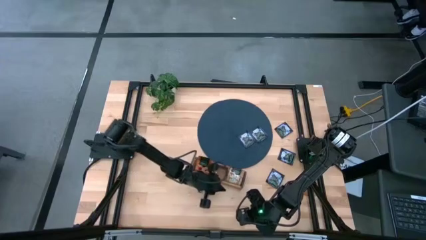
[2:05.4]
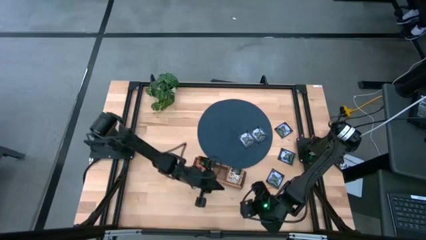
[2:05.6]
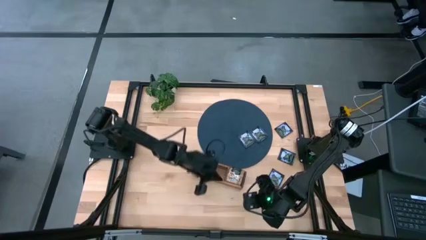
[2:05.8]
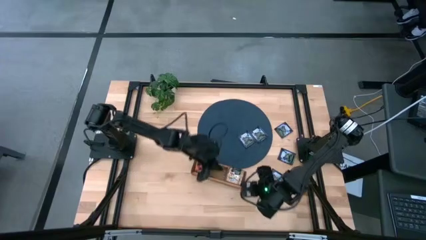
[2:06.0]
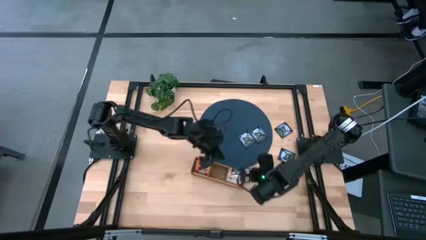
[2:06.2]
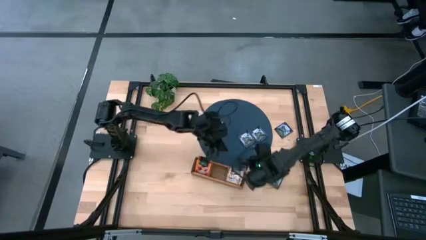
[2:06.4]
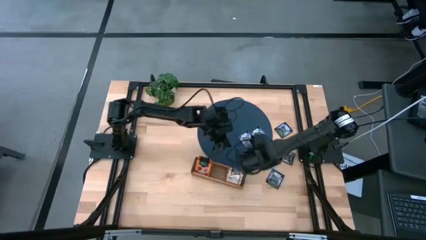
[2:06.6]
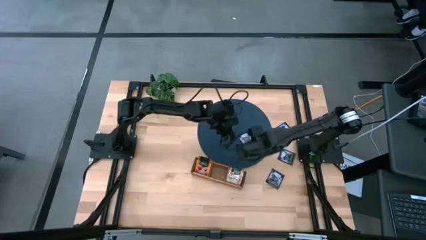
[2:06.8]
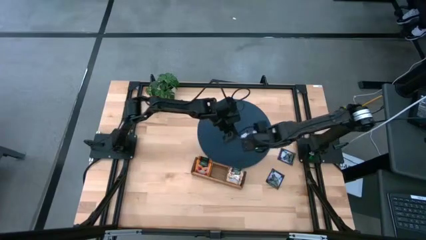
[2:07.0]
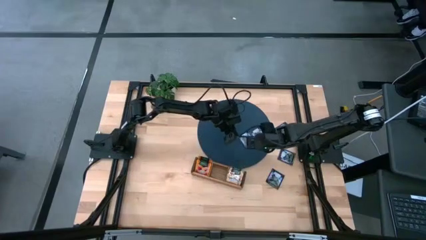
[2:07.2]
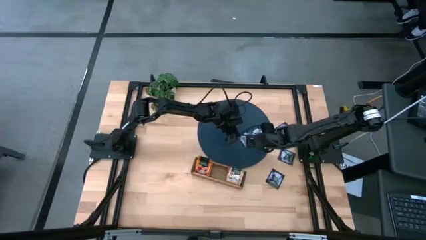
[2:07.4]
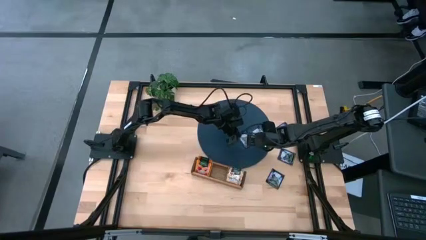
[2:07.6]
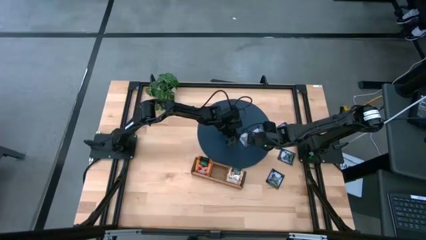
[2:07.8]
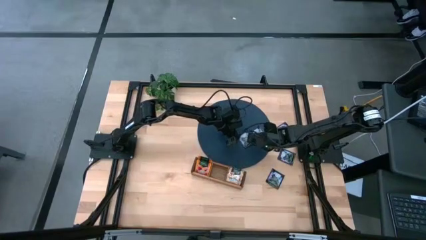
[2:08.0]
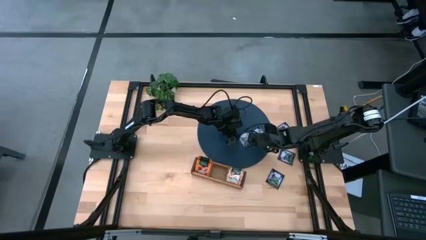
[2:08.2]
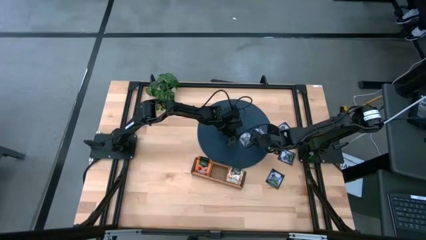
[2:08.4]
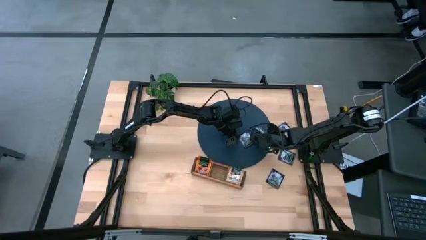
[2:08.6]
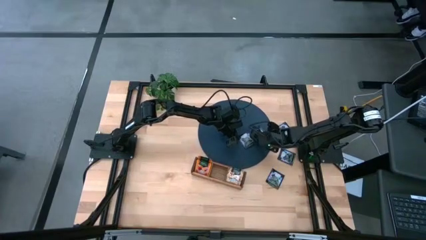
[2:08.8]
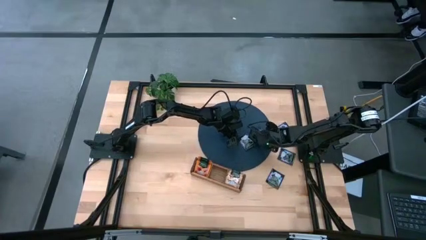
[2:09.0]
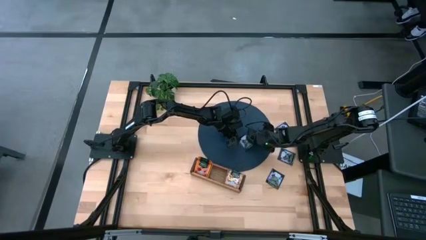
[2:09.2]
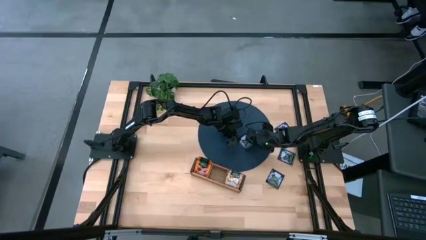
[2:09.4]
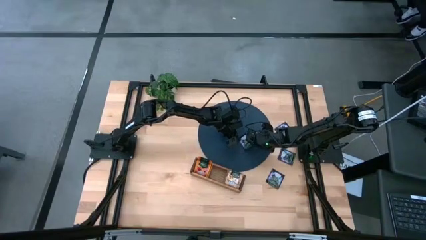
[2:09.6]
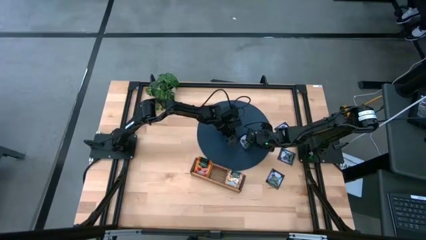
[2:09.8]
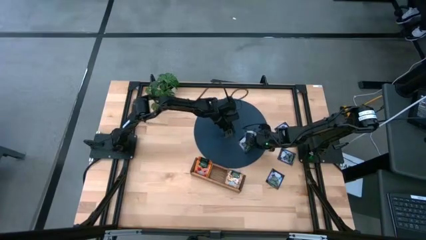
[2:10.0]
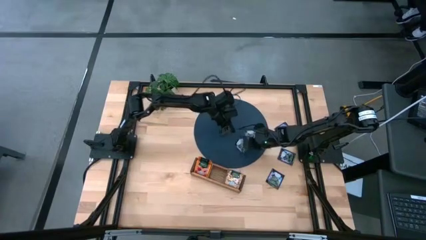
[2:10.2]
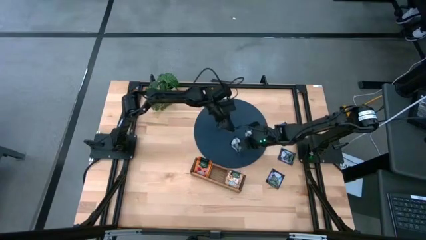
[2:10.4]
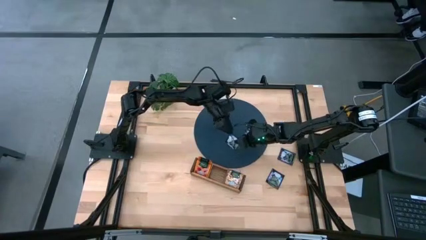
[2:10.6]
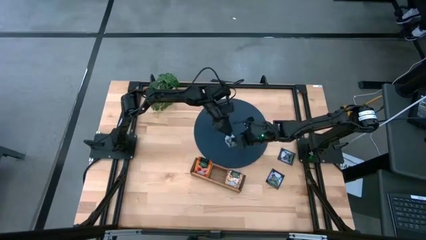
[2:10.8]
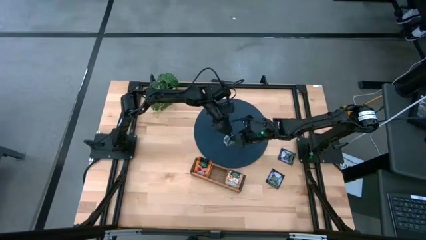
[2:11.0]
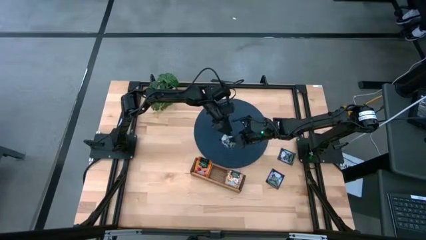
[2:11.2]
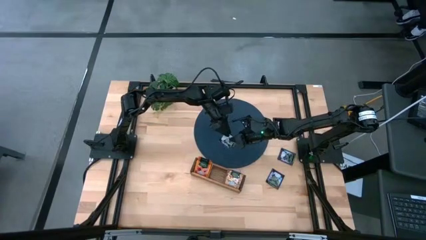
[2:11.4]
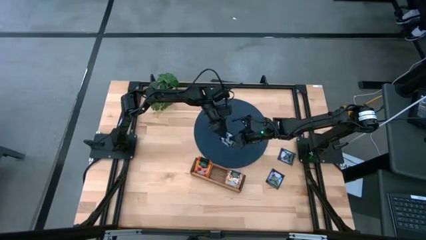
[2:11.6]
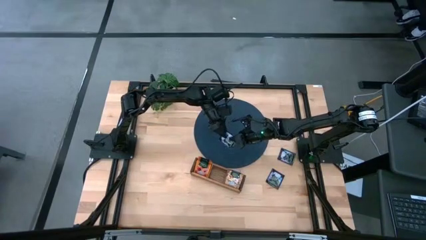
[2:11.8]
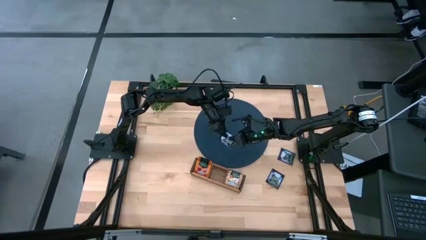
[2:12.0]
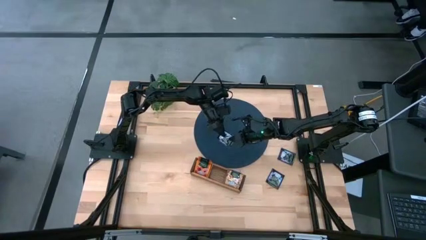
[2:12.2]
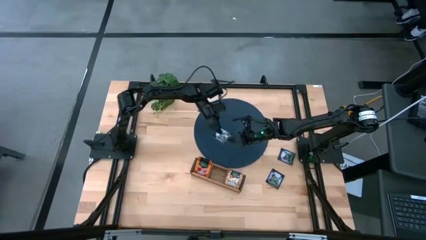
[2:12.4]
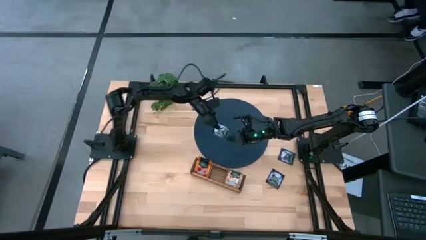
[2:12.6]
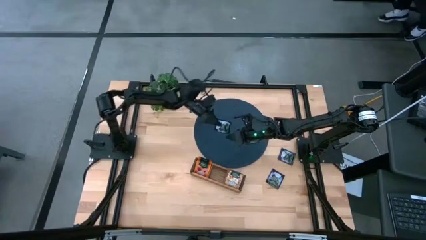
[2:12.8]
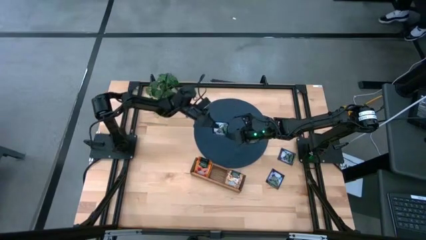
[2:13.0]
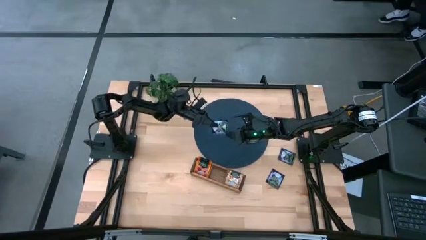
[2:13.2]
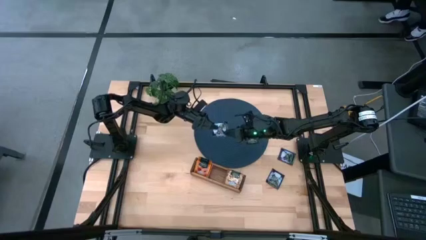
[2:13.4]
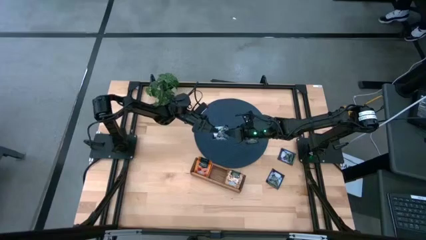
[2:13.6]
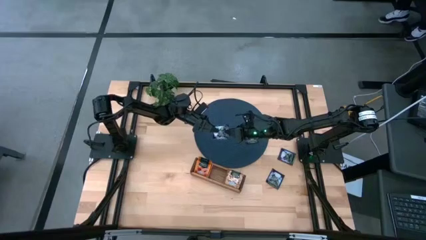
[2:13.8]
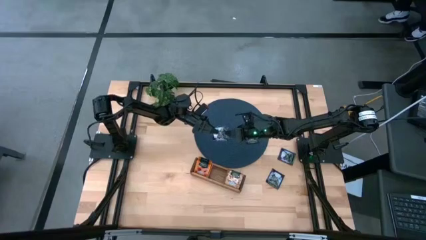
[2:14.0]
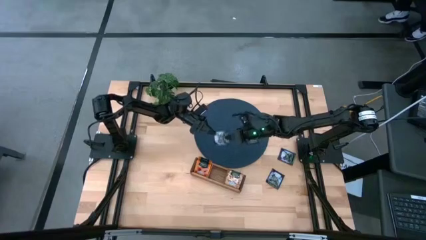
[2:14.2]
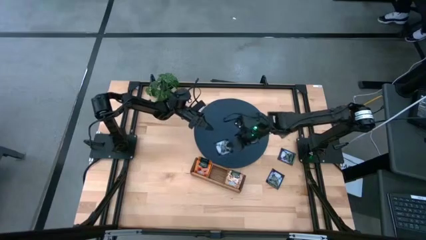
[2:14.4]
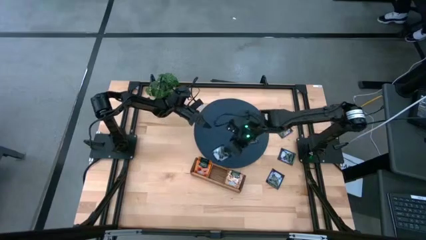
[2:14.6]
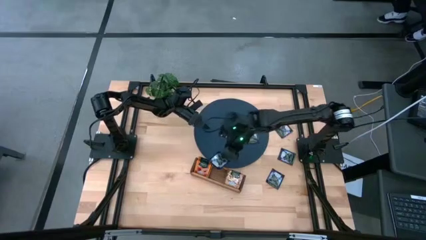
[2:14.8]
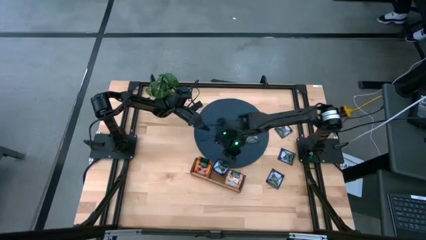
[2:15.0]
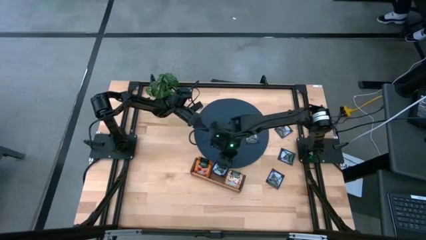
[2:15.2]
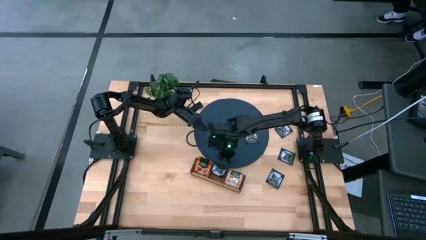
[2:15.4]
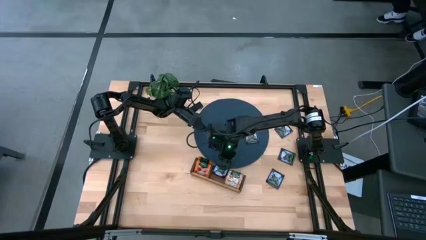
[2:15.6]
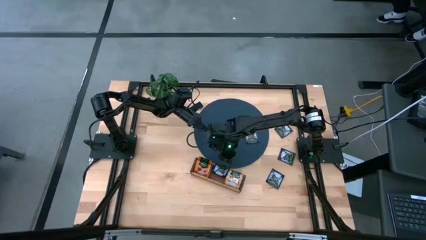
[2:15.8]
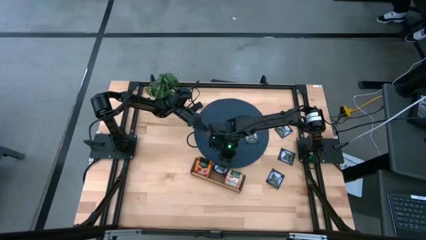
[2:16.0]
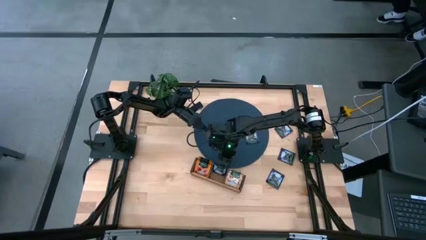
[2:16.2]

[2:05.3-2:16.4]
Task: Pick & Place Tea
Put the violet tea bag into the middle section of the wooden organizer

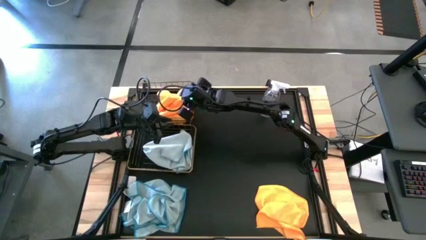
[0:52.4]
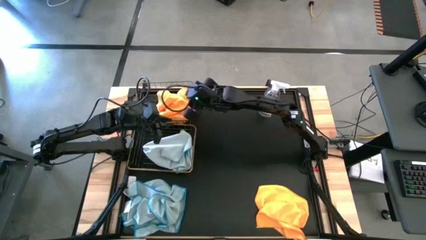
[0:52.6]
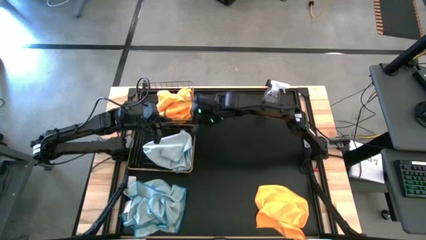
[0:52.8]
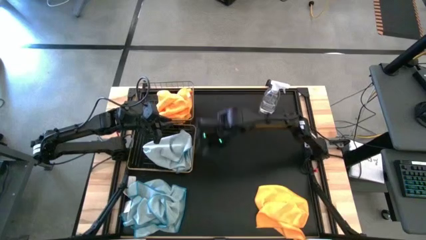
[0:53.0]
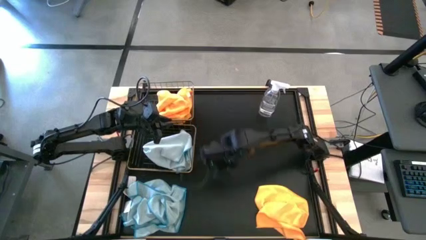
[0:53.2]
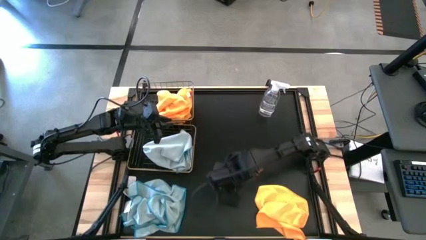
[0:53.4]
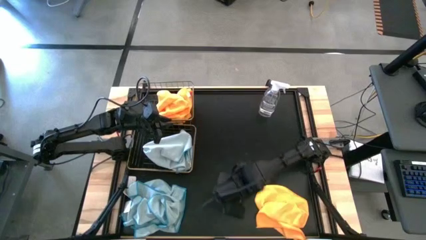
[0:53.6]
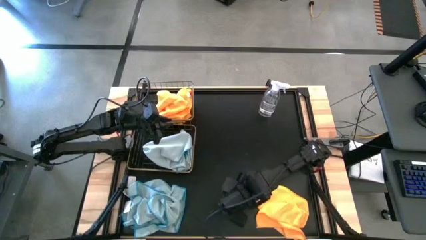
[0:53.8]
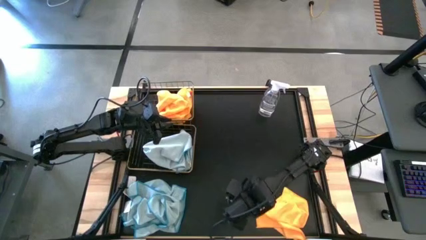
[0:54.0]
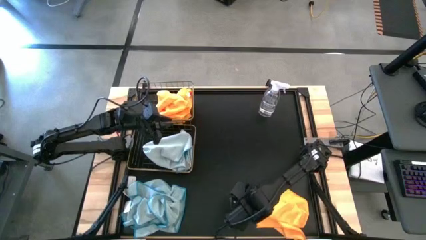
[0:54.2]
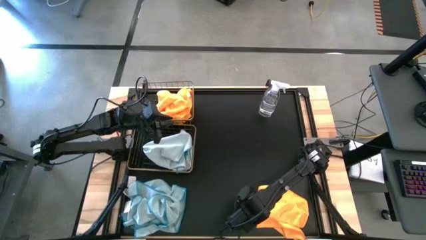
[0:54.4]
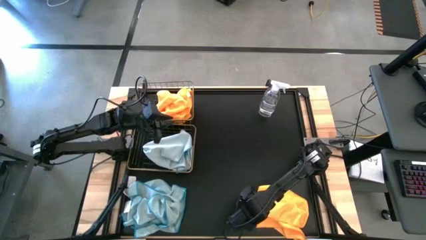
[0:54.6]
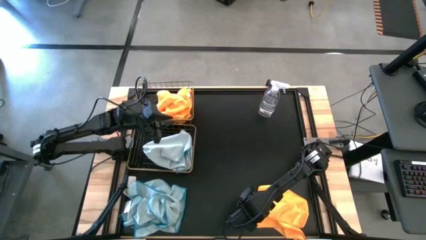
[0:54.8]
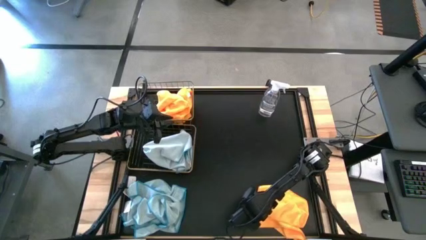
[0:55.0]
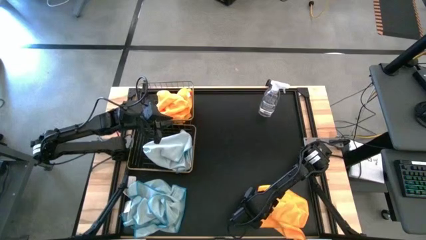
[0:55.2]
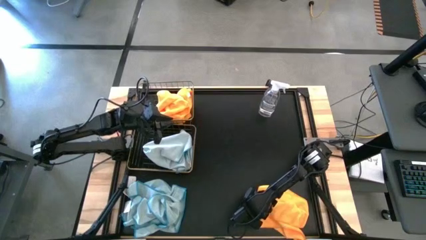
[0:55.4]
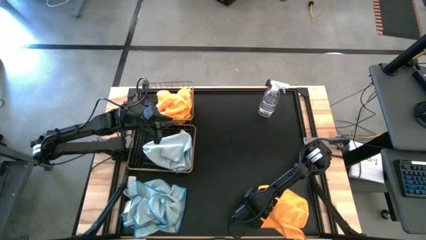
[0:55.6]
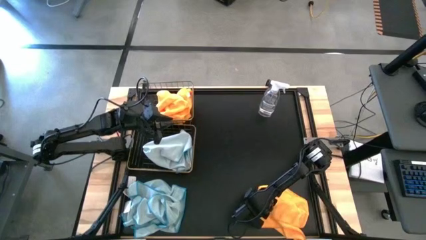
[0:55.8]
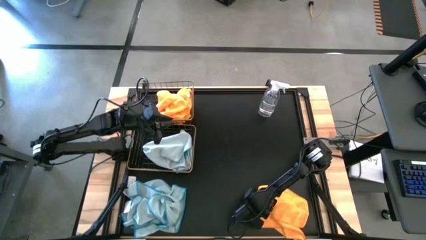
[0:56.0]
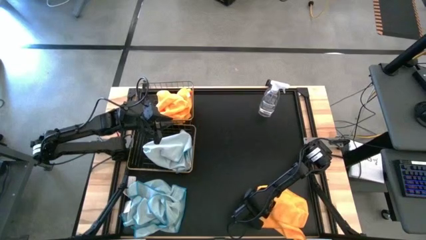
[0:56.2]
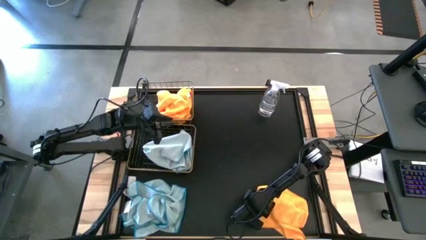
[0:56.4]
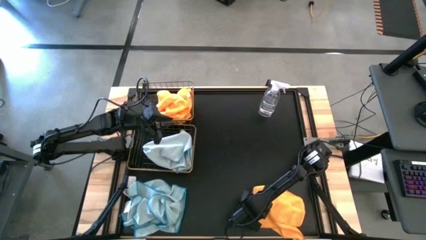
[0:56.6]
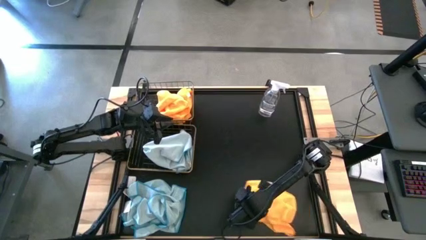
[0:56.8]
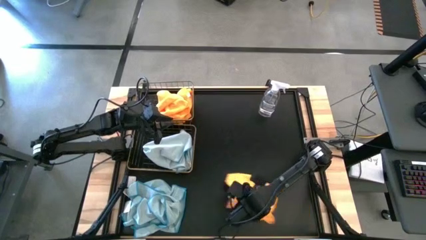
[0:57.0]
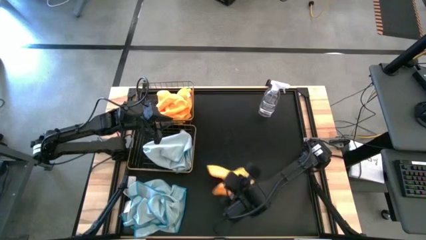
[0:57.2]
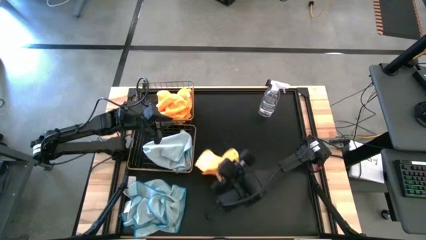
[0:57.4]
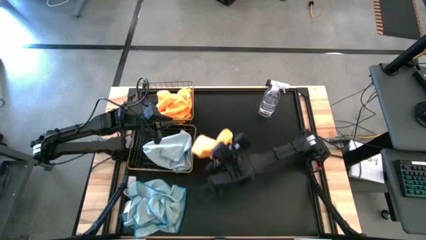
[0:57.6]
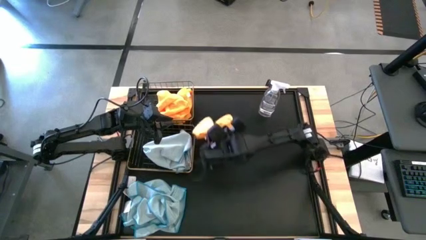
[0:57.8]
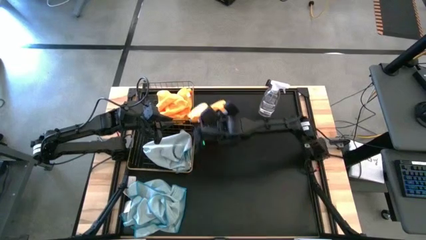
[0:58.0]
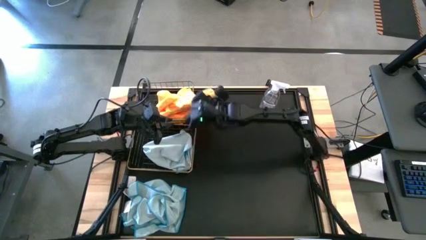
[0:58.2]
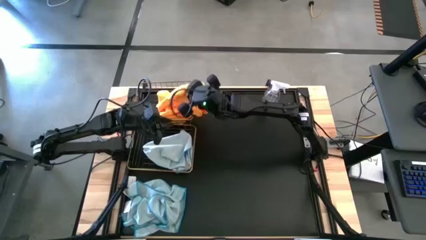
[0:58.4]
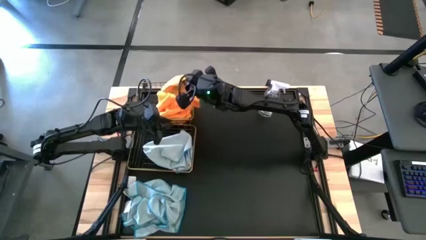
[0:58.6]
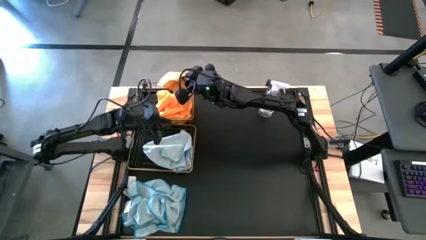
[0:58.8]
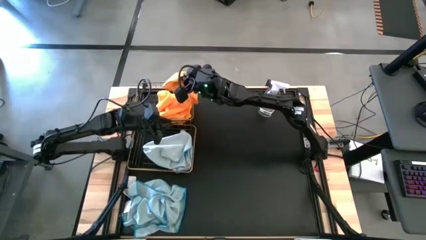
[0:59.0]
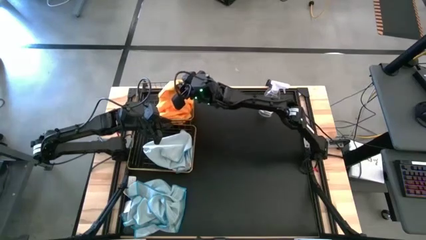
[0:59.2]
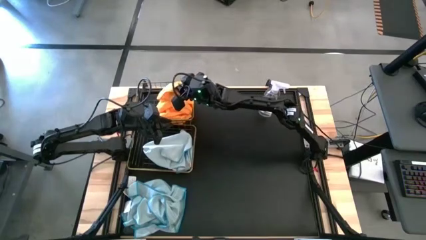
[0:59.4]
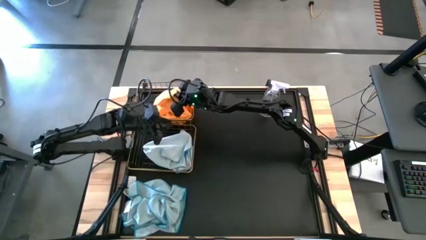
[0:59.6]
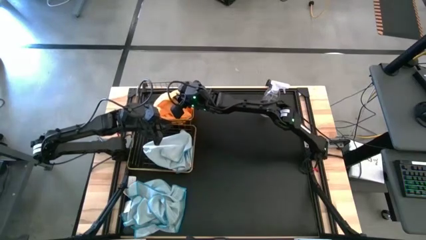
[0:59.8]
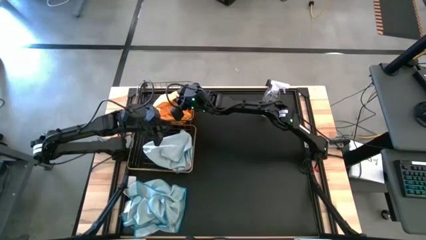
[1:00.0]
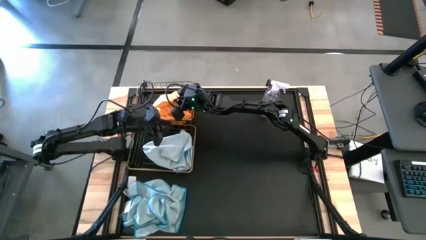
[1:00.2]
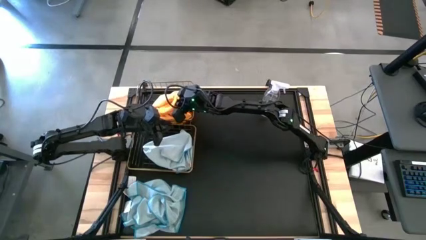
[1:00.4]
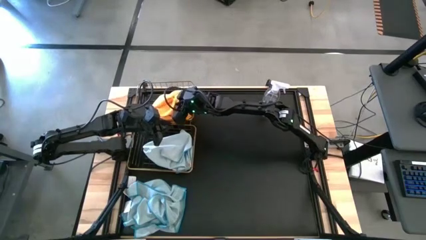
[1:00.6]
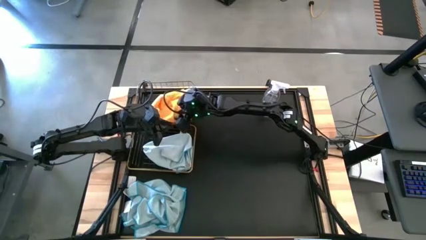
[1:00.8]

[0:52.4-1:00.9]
Task: Sort microfiber towel by color & place in baskets
Put the yellow towel into the top wire basket
